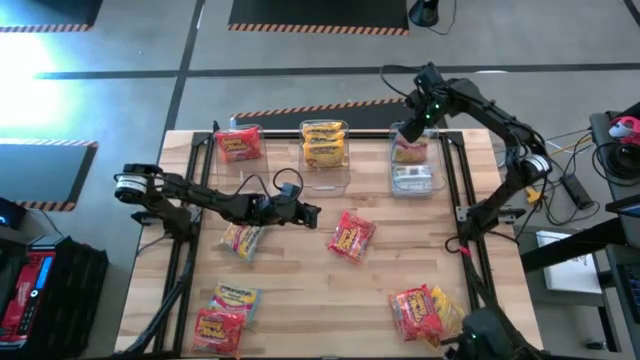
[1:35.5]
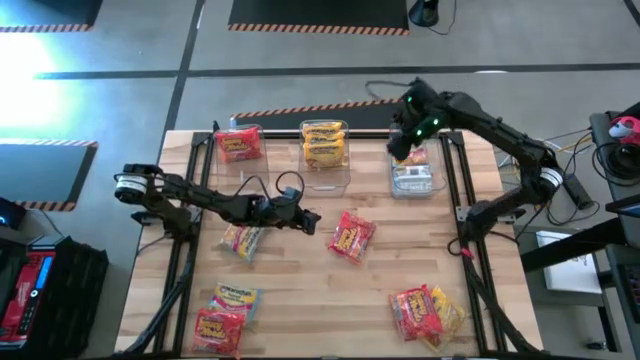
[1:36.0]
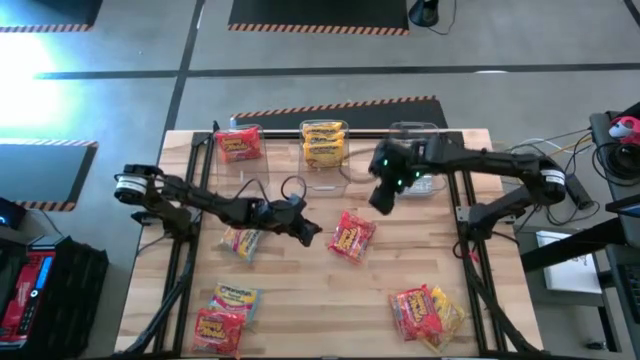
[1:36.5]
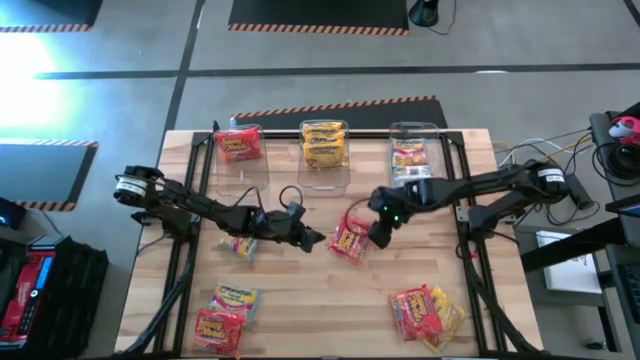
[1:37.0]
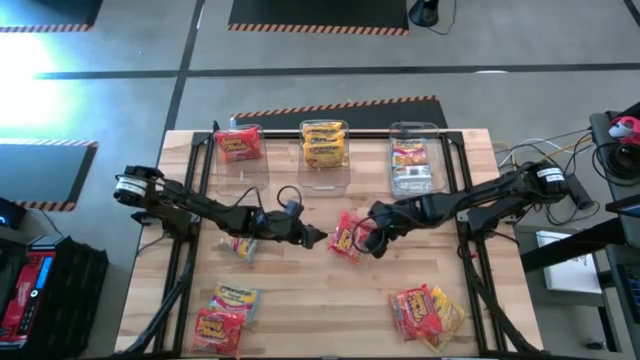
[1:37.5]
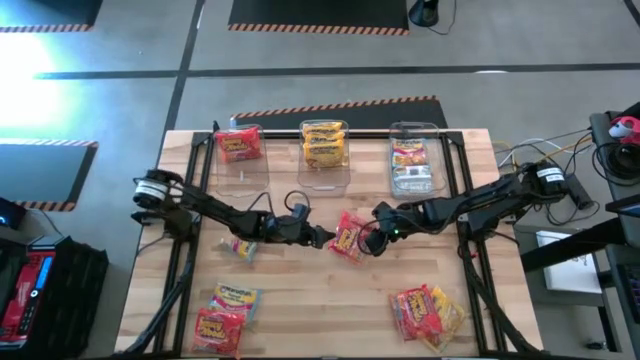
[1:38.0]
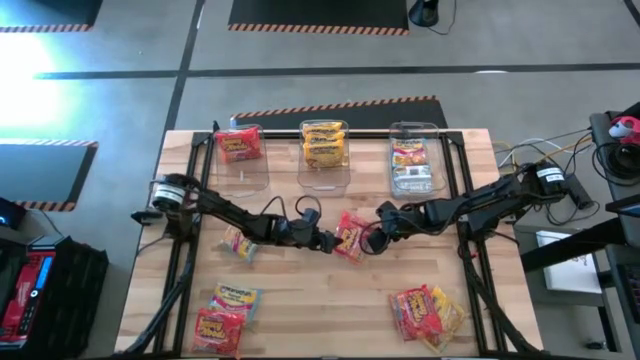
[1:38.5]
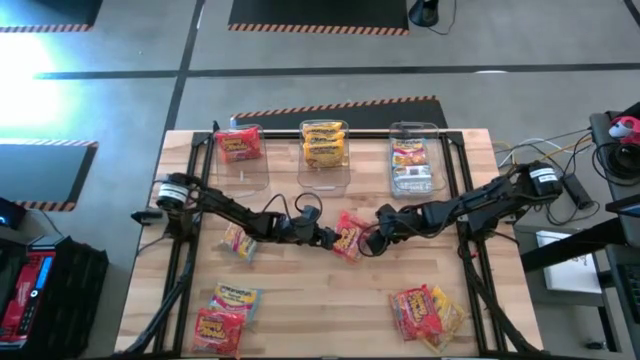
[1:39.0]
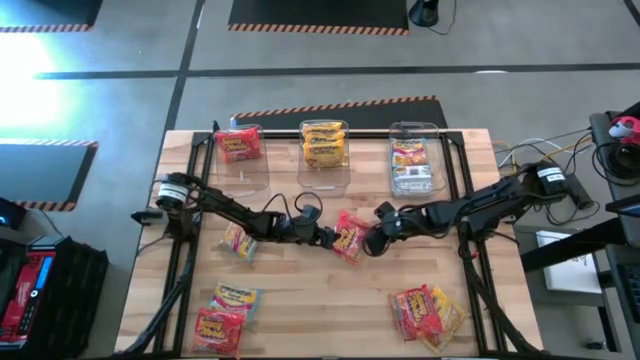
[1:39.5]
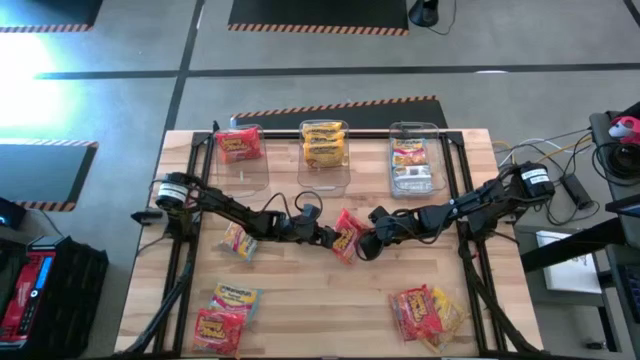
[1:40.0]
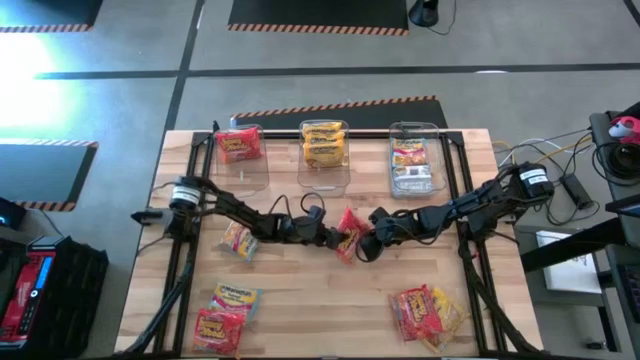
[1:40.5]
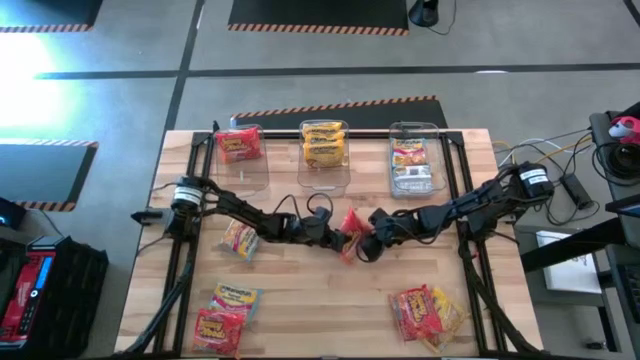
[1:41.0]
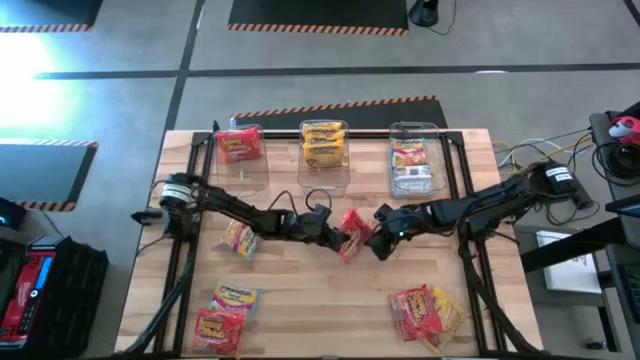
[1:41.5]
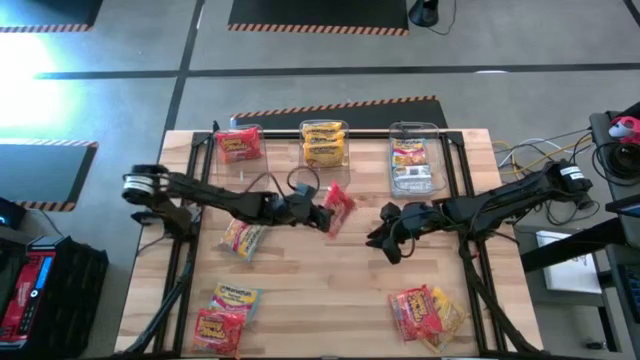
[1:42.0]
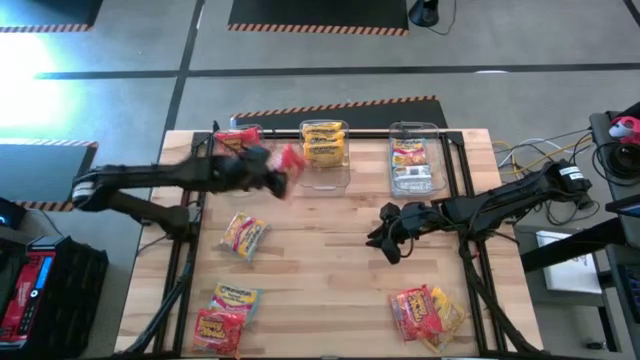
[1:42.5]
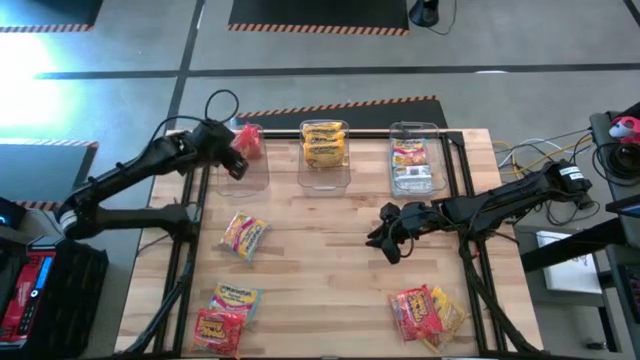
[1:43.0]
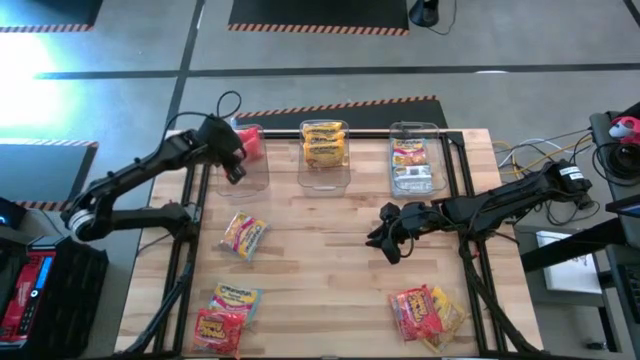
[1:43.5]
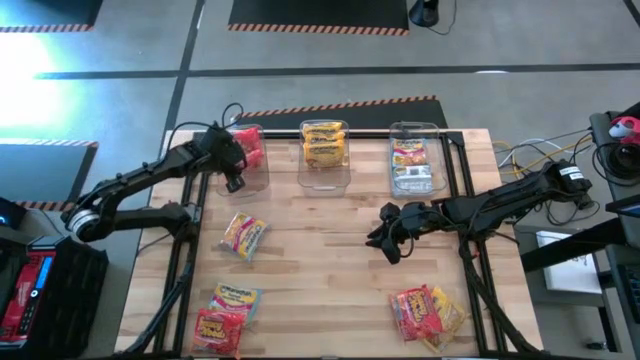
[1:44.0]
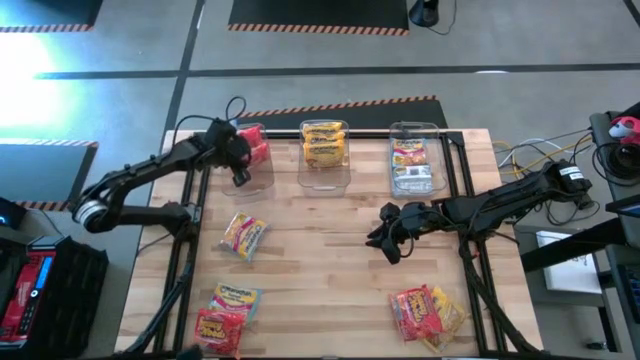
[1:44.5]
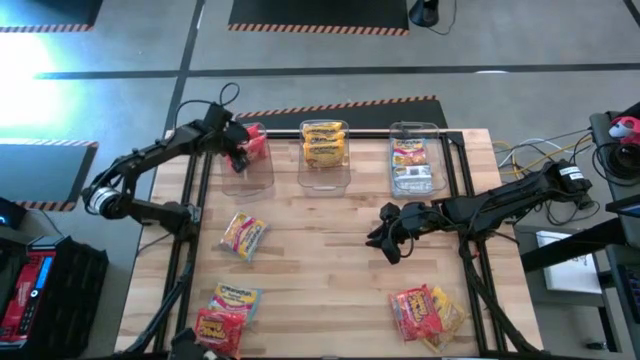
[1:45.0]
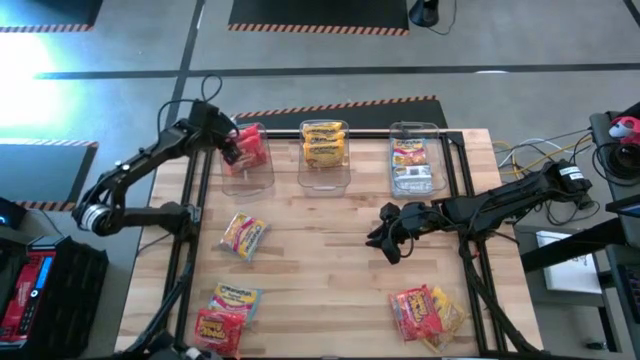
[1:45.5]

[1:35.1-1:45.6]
Task: Sort Maruchan noodles
Put the orange noodle pack into the left transparent bin

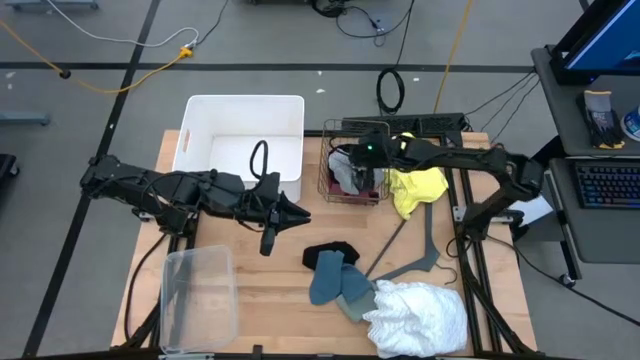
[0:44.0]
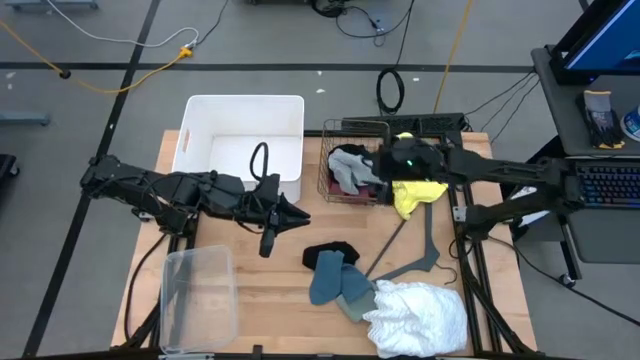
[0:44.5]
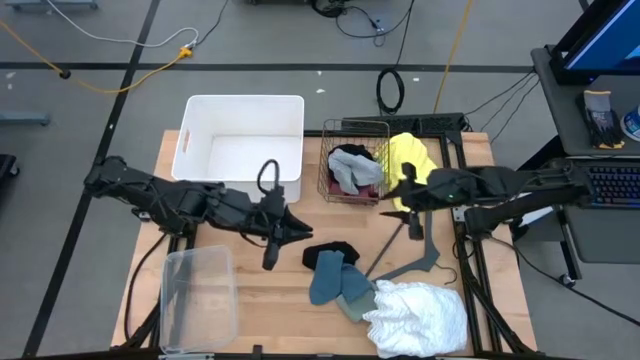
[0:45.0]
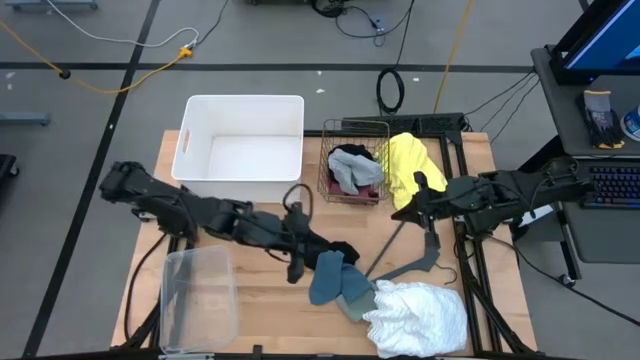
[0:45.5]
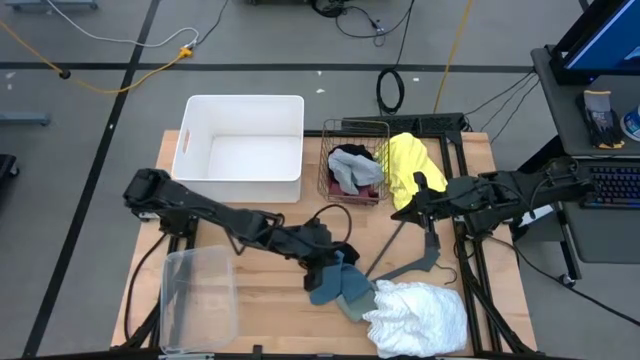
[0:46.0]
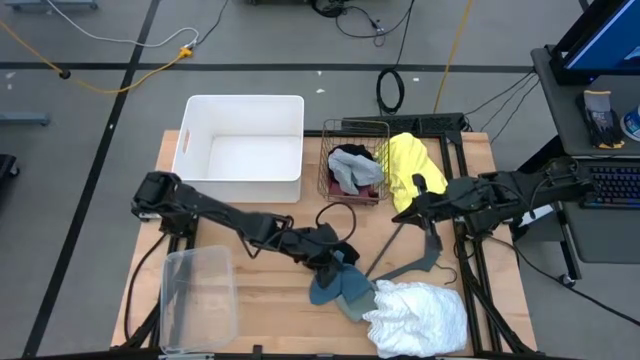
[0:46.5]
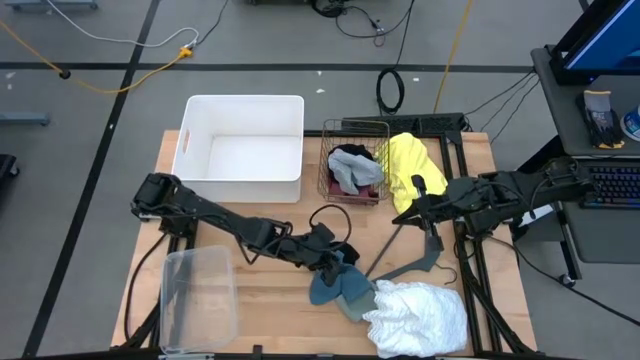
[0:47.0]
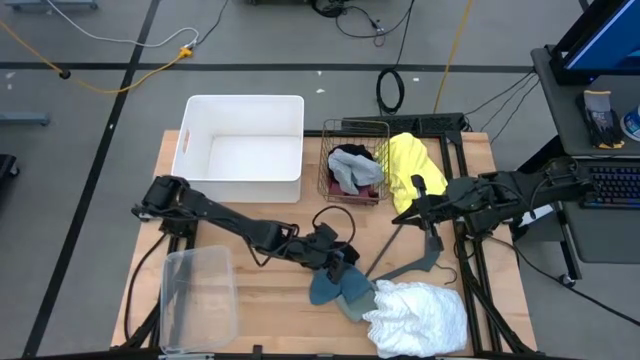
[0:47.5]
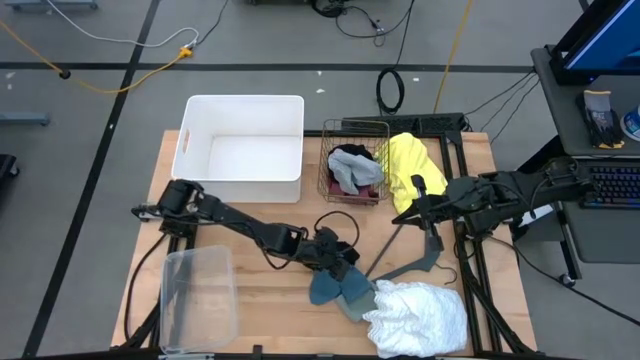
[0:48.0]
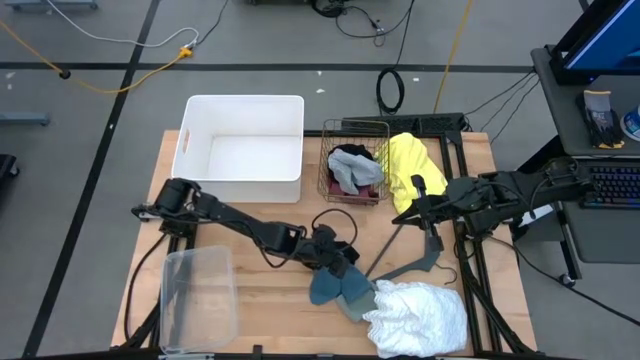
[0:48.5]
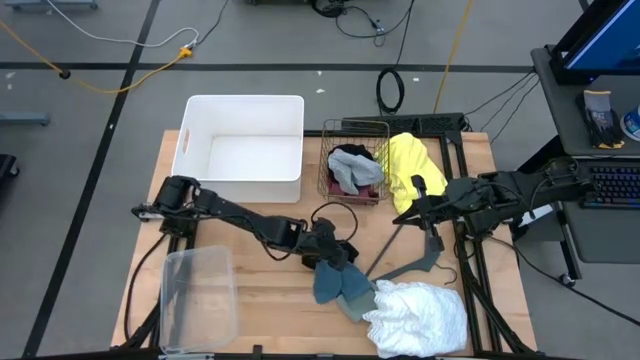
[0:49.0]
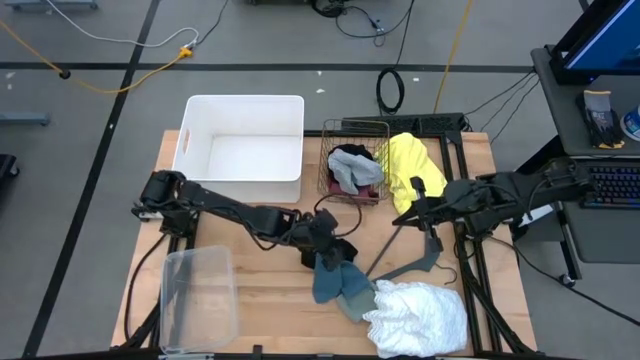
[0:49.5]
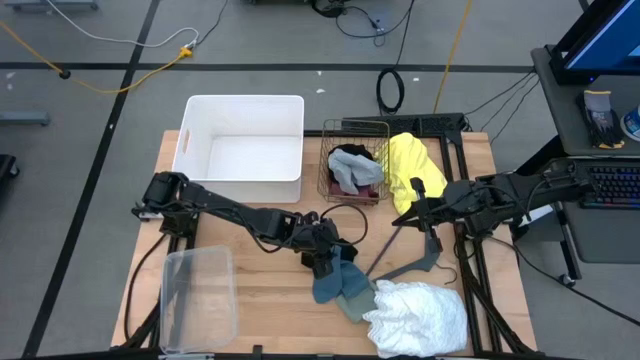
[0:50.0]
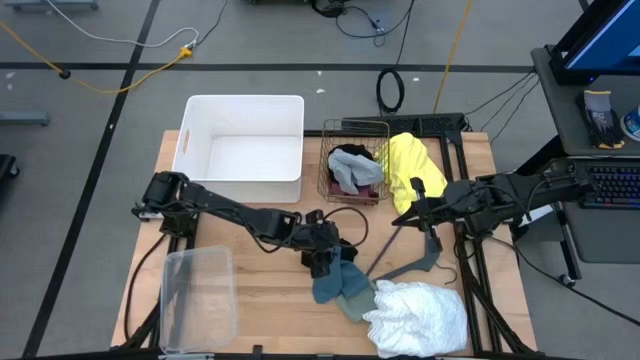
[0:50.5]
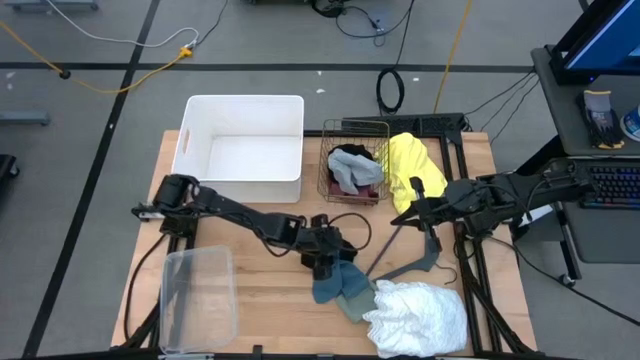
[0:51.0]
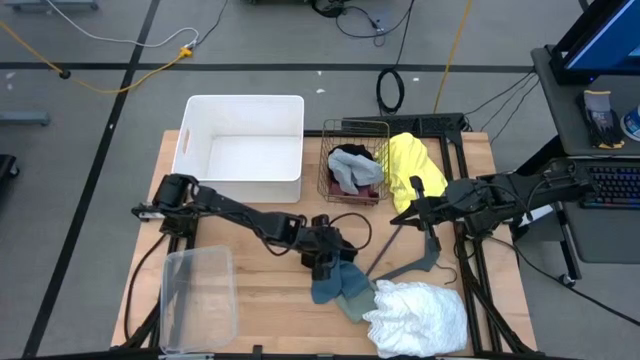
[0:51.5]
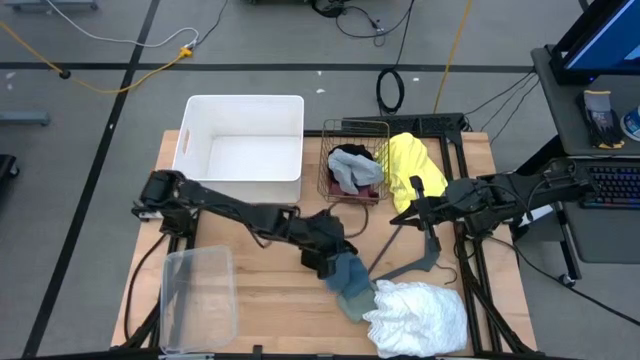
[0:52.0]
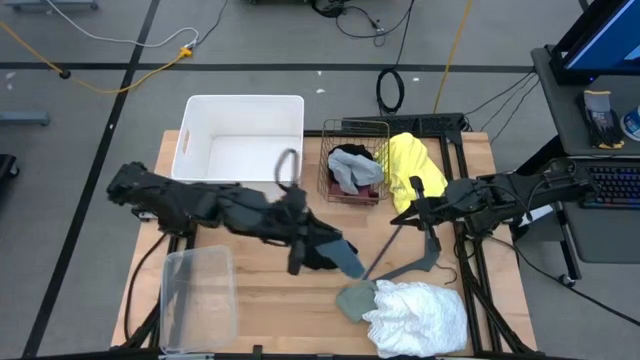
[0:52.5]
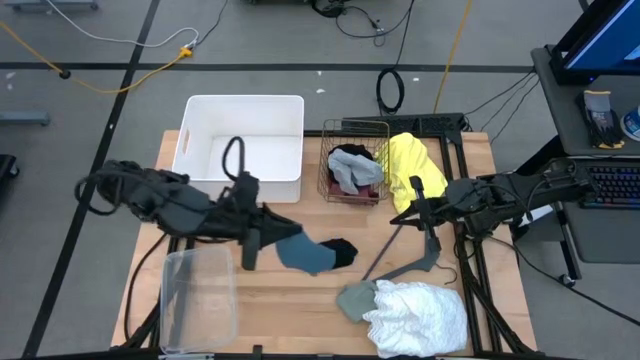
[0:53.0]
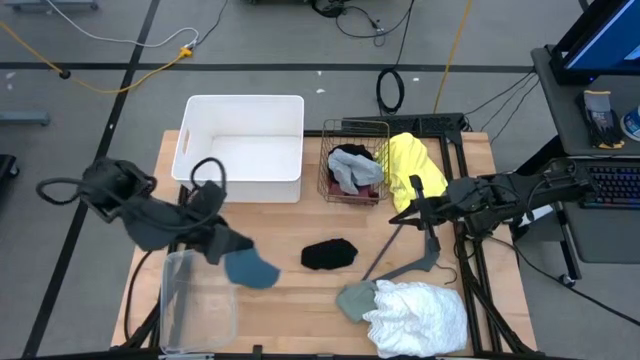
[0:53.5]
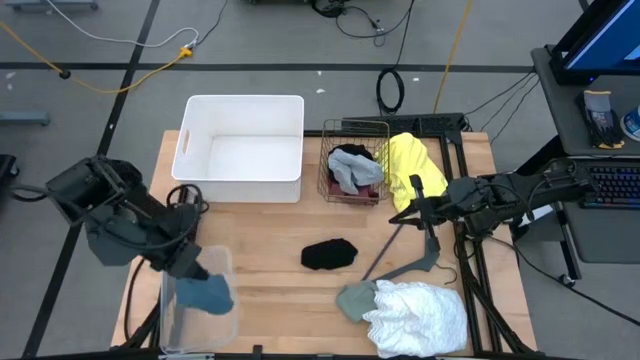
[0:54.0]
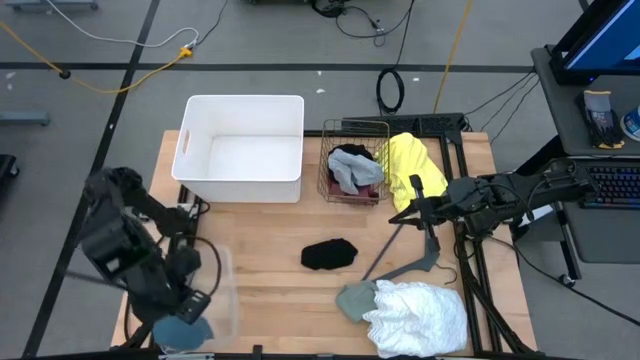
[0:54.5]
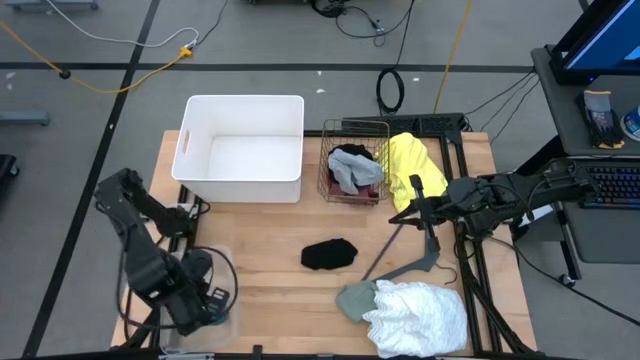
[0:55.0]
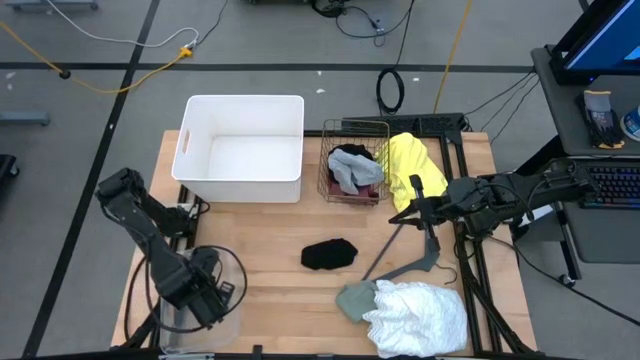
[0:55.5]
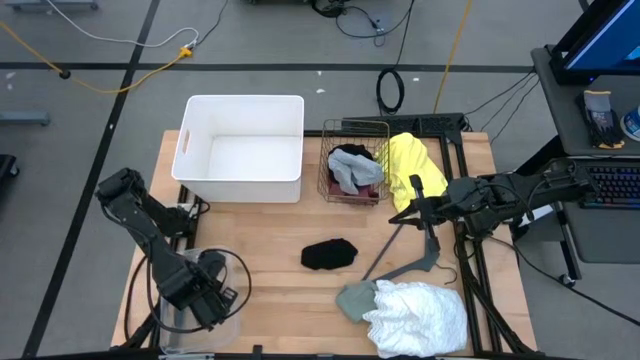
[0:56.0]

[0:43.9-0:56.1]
Task: Pick & Place Cloths
Put the blue sock into the transparent bin
